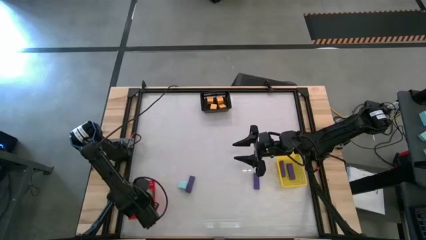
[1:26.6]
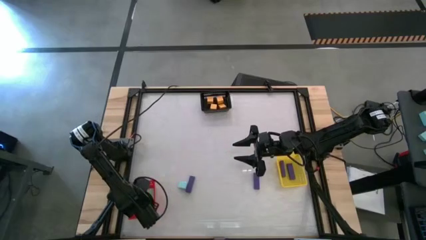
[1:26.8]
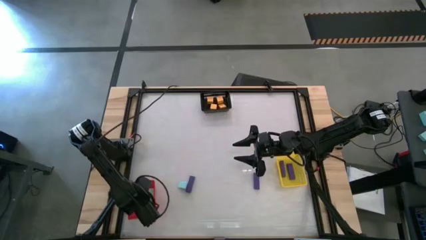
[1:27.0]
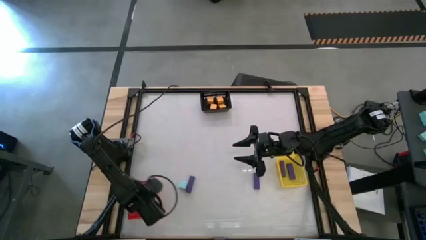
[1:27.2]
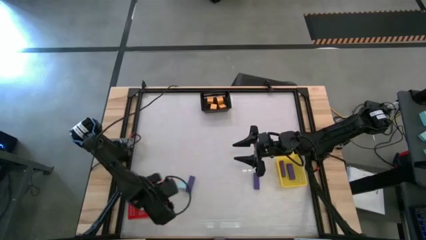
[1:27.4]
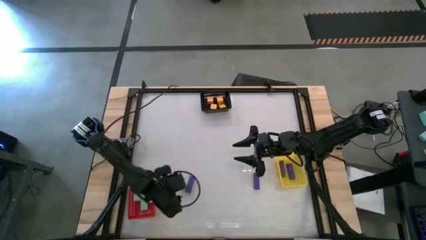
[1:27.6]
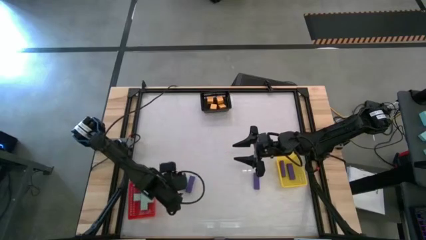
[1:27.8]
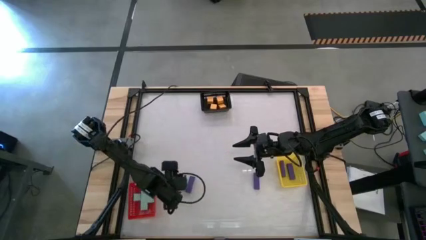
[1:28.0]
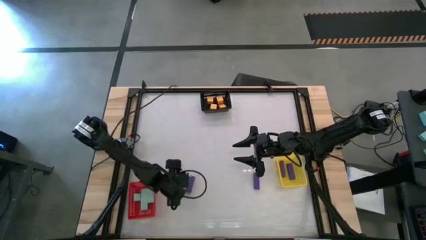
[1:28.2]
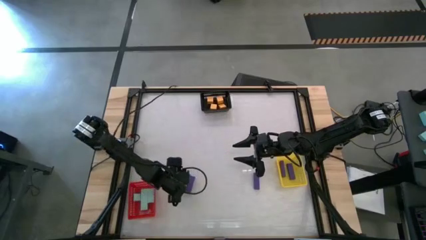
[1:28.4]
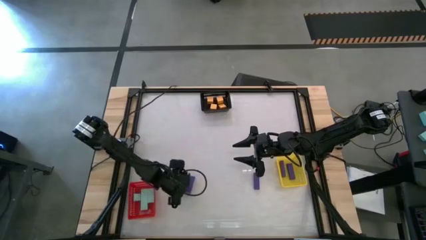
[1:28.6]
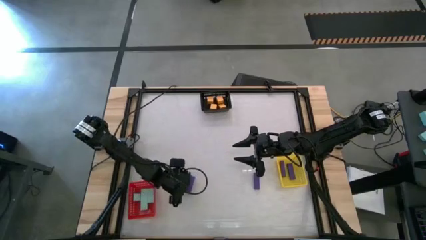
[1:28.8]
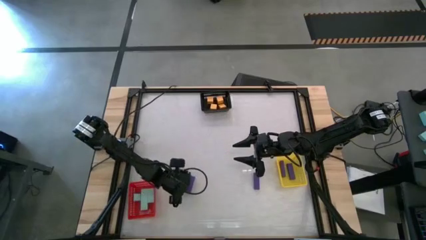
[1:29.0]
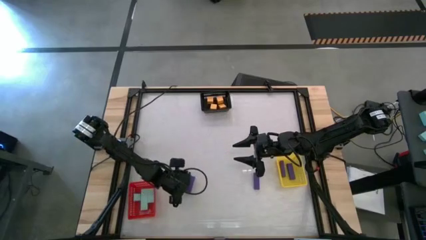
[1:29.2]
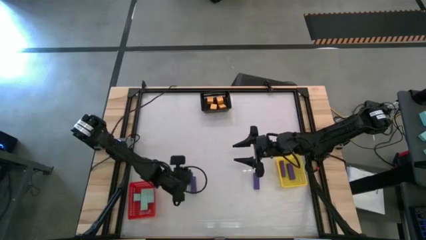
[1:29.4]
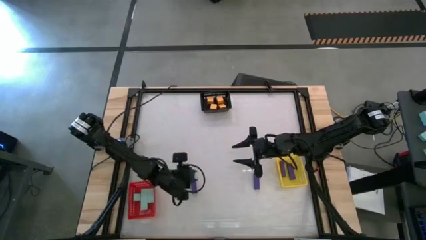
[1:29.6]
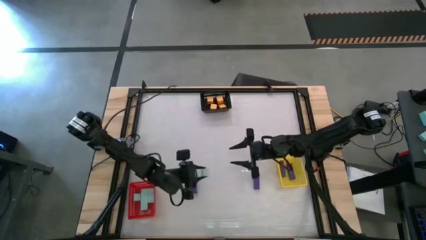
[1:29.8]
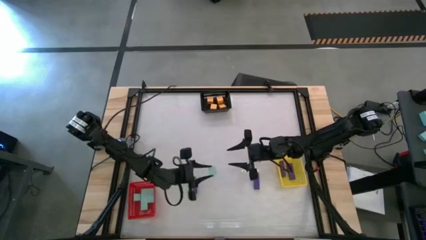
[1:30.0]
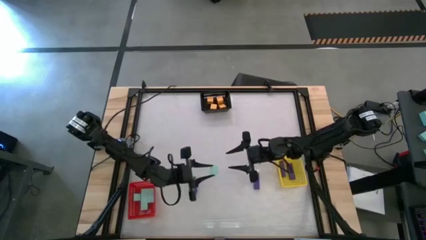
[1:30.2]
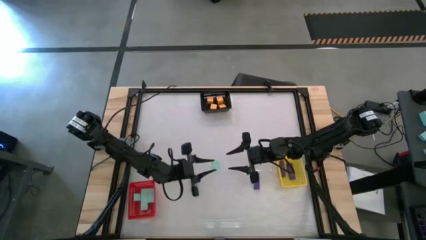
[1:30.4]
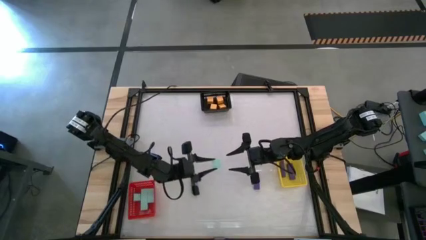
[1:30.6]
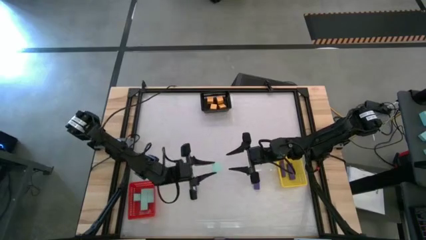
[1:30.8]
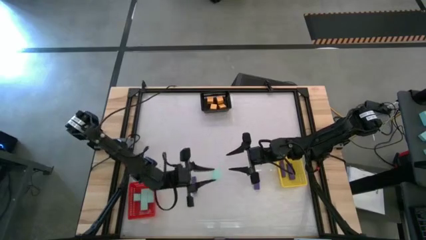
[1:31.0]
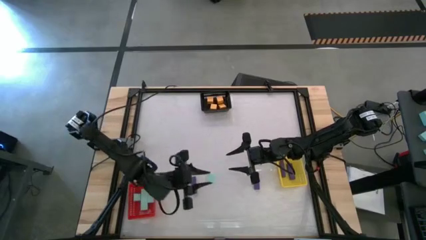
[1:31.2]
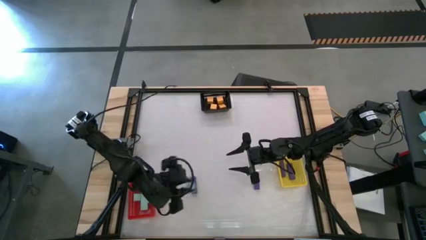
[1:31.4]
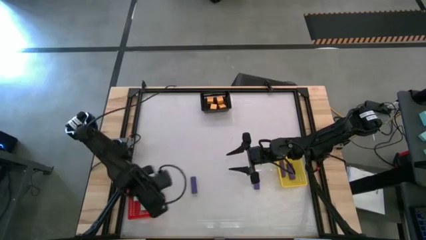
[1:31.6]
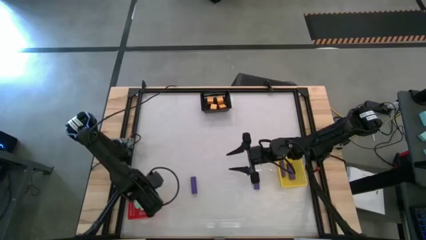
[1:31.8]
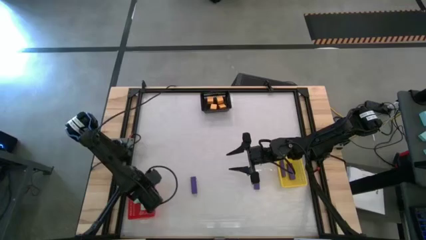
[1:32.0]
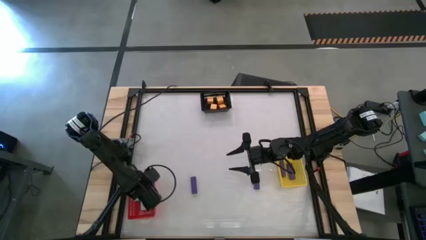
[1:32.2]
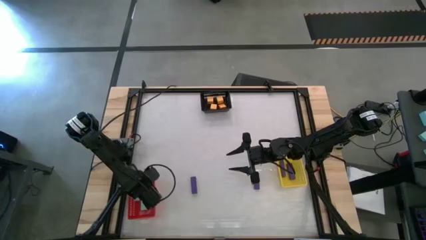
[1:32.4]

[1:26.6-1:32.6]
Task: Sort & place blocks by color
Put the blue block into the red bin

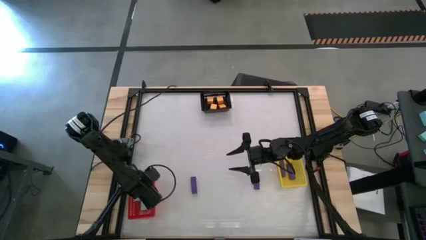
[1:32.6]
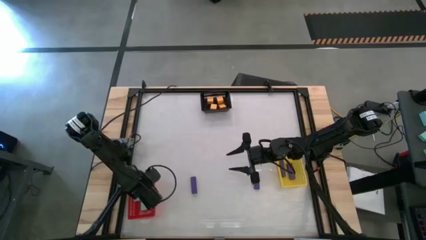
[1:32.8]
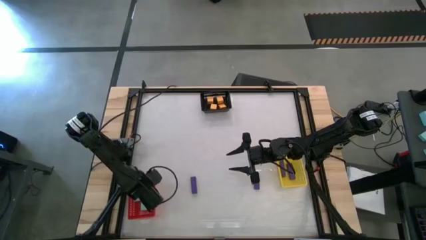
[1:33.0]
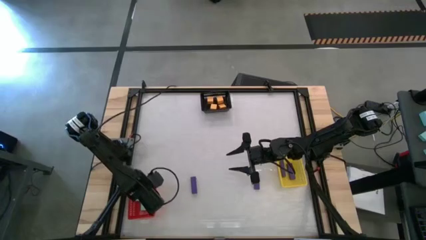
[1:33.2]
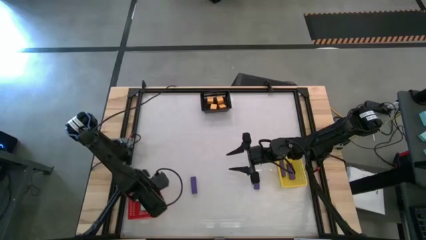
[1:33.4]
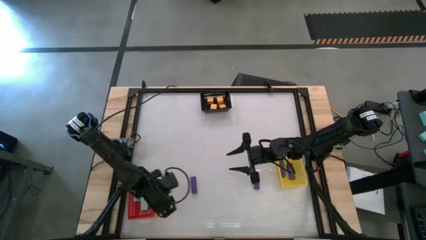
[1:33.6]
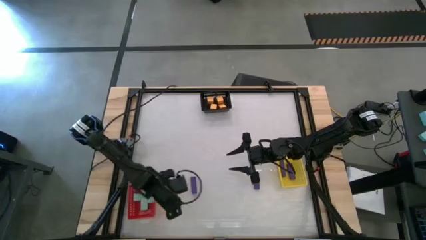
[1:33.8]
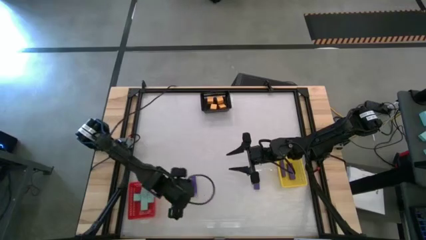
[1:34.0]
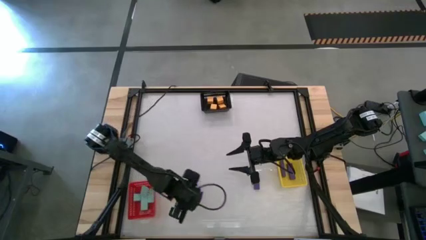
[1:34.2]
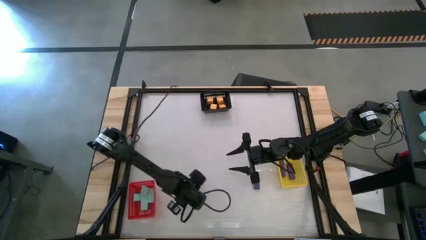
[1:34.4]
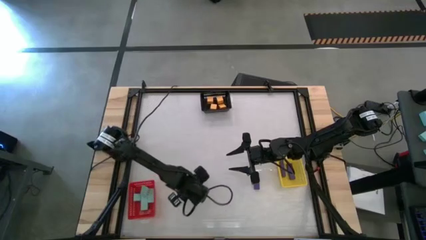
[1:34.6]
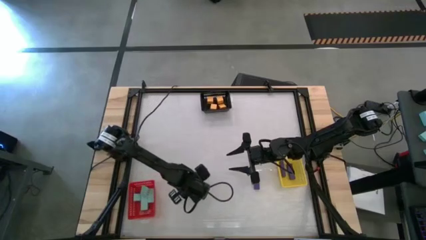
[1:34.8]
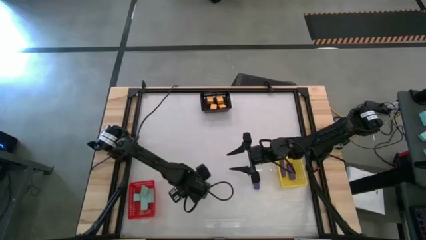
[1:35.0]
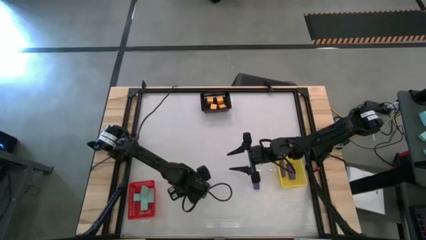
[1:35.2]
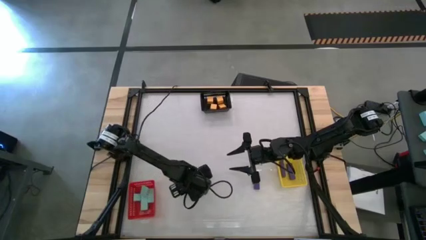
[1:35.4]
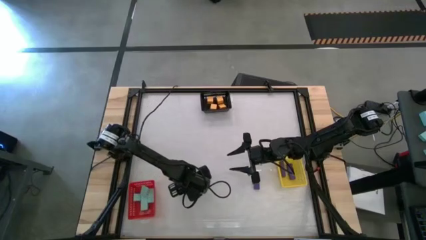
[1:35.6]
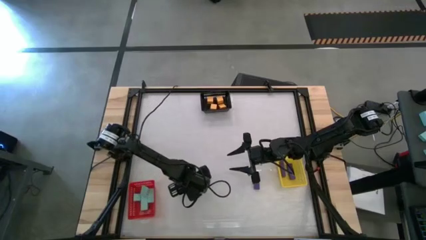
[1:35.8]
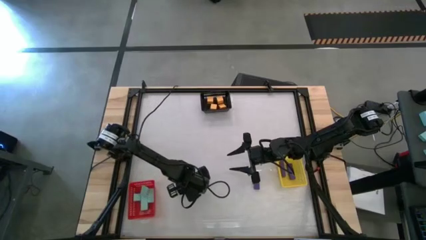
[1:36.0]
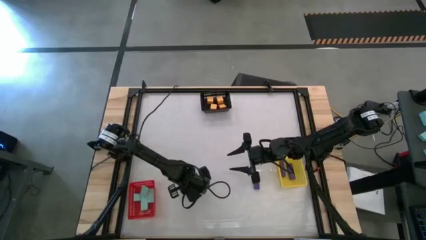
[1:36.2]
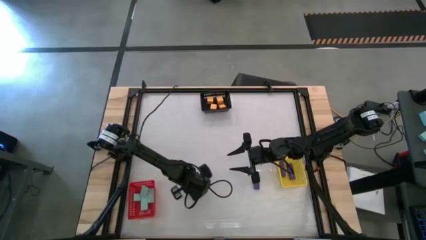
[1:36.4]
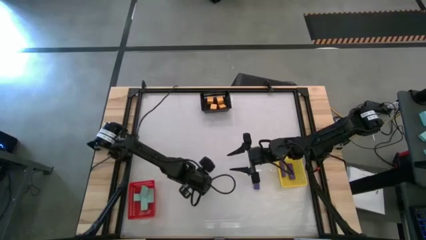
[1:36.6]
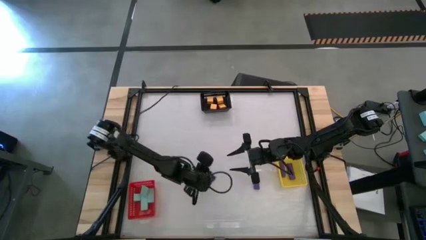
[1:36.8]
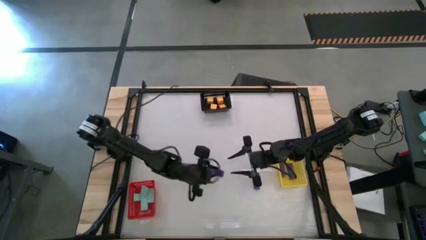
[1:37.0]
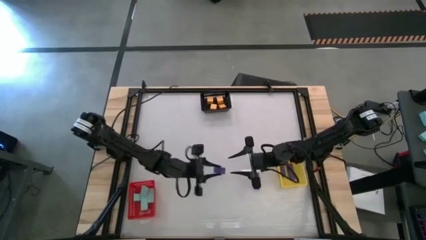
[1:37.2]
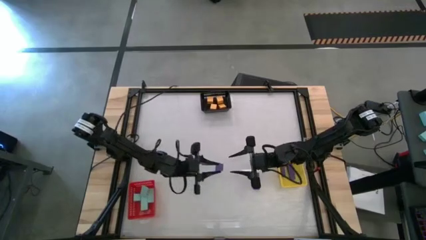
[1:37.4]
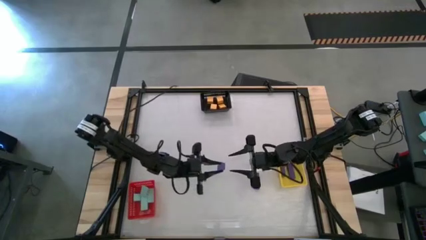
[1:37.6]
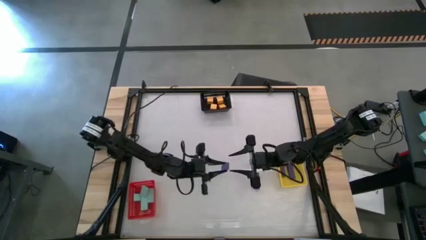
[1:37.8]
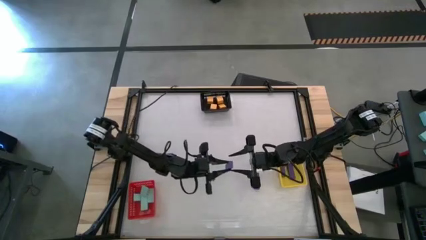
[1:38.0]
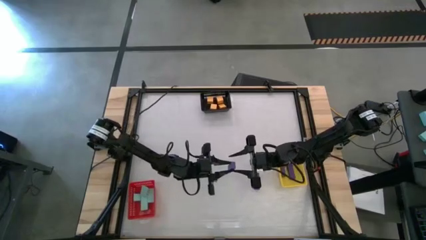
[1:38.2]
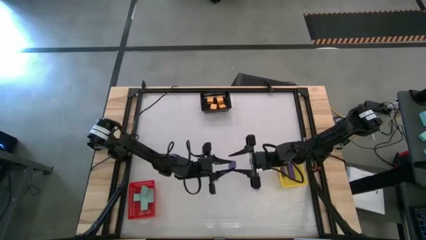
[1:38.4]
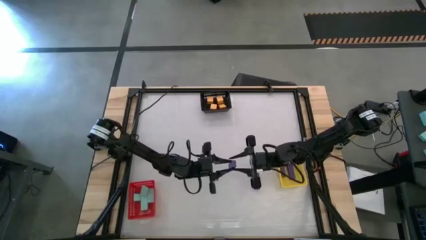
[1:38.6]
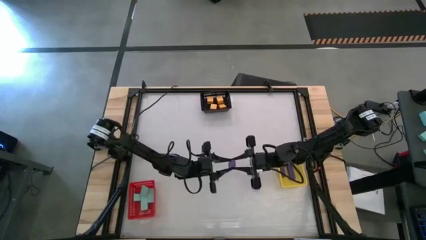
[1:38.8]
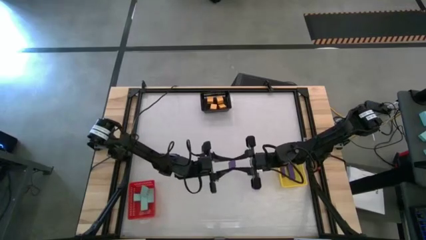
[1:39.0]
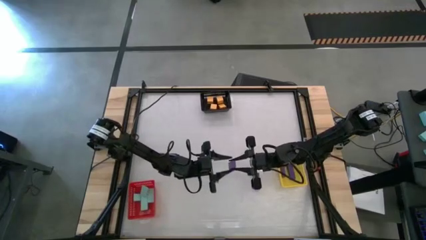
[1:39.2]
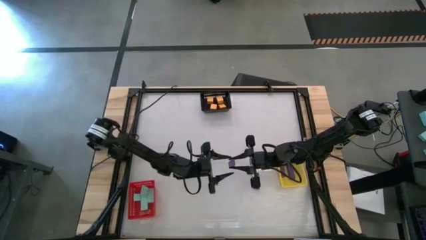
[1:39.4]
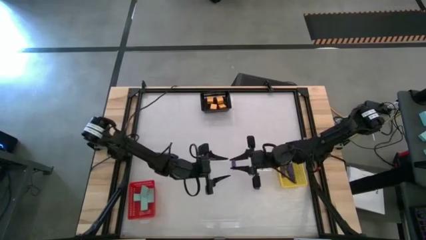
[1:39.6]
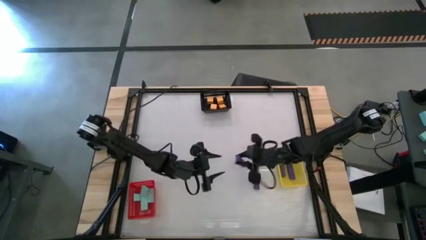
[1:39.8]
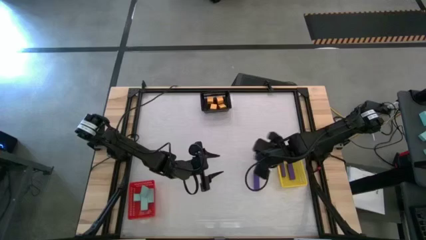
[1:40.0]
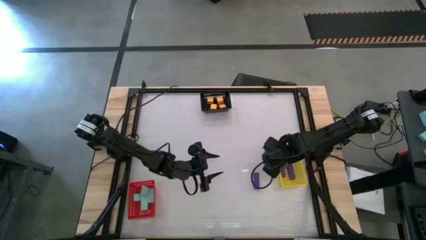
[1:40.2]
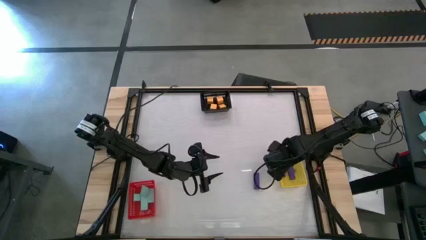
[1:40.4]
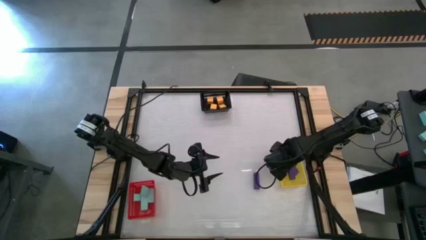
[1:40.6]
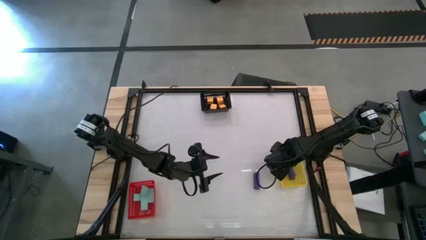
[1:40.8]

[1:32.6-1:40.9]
Put the purple block into the yellow bin
